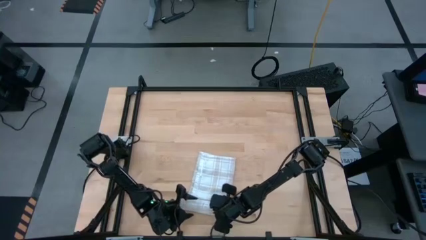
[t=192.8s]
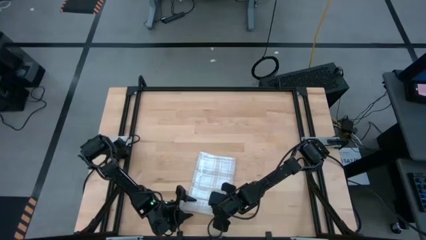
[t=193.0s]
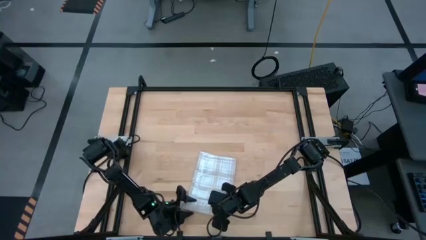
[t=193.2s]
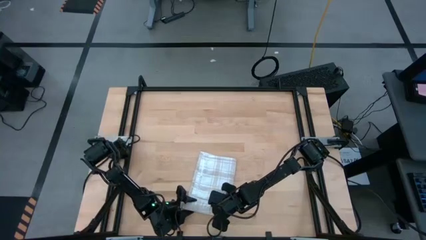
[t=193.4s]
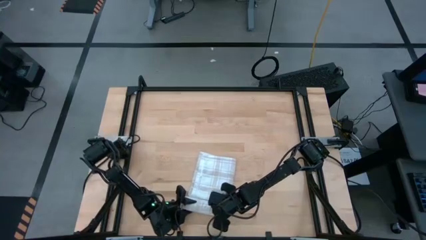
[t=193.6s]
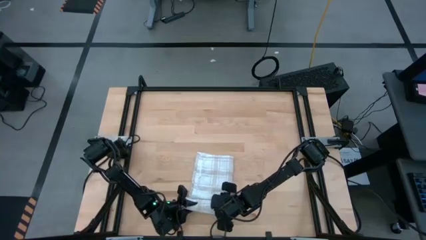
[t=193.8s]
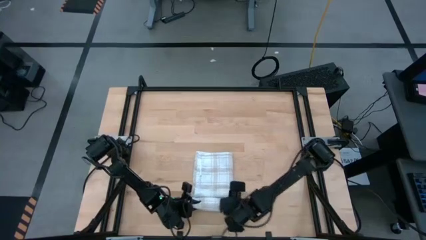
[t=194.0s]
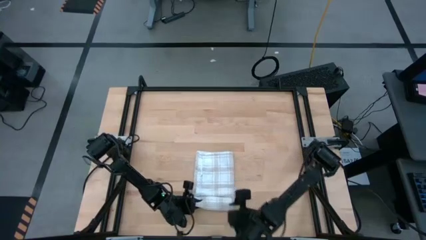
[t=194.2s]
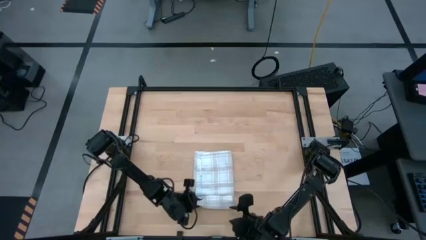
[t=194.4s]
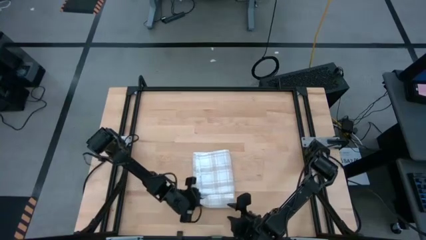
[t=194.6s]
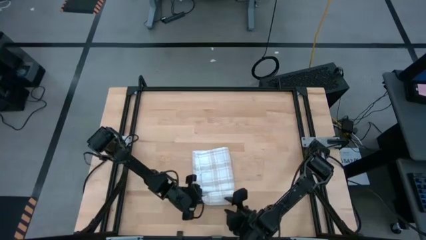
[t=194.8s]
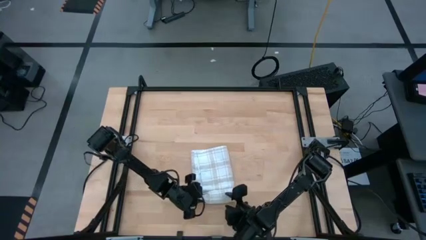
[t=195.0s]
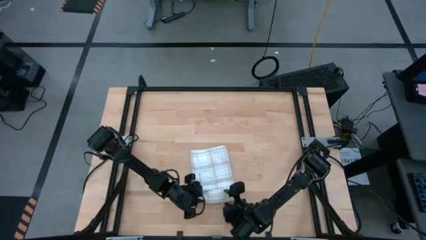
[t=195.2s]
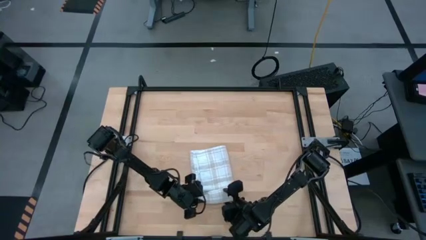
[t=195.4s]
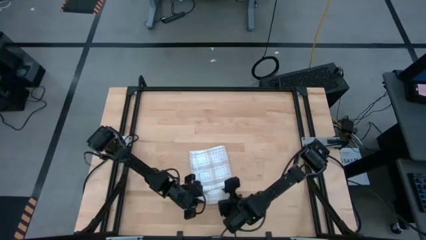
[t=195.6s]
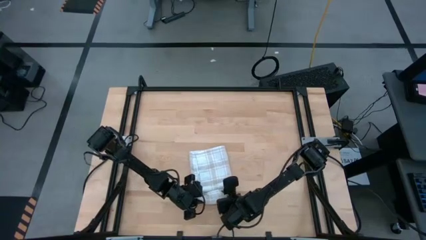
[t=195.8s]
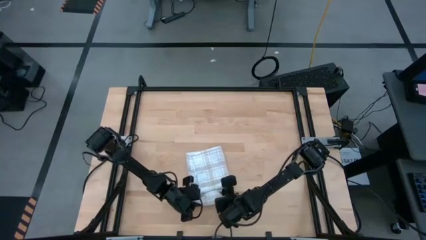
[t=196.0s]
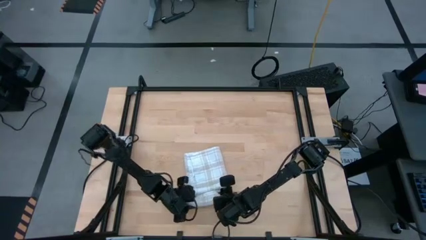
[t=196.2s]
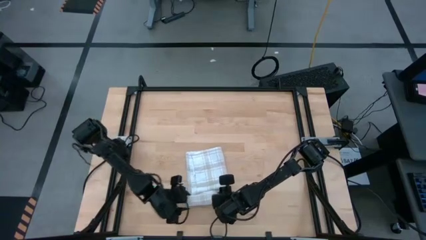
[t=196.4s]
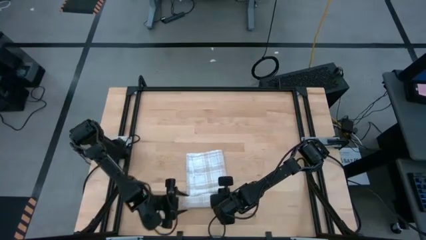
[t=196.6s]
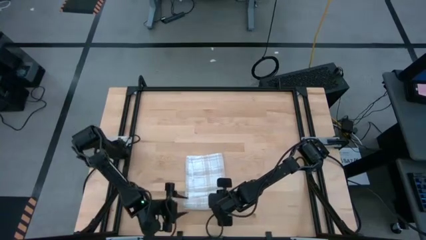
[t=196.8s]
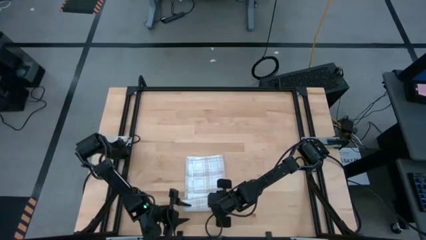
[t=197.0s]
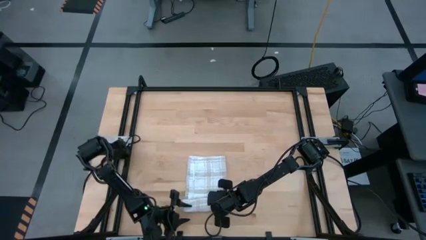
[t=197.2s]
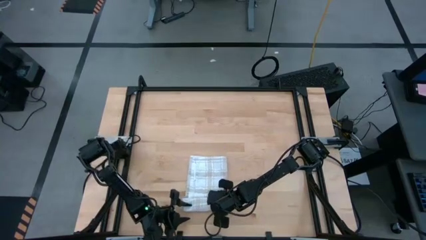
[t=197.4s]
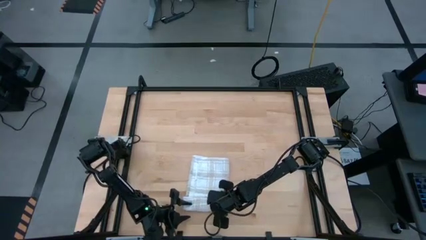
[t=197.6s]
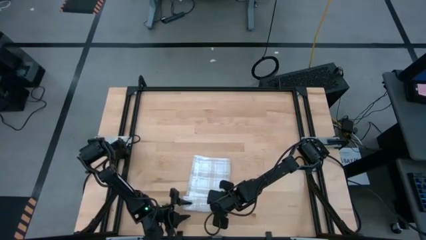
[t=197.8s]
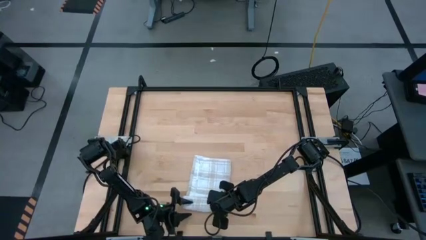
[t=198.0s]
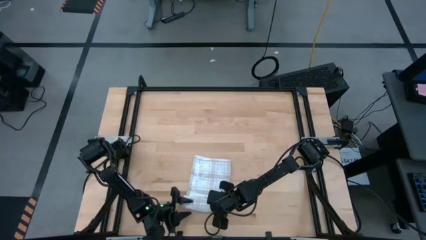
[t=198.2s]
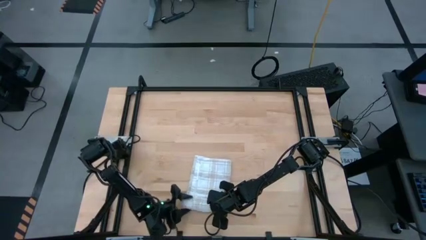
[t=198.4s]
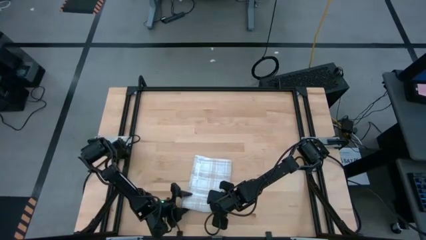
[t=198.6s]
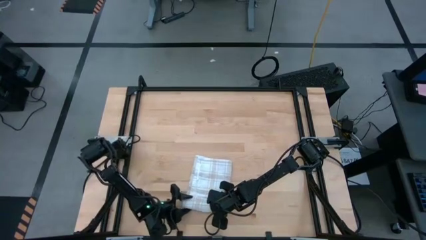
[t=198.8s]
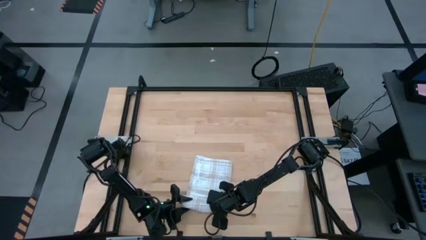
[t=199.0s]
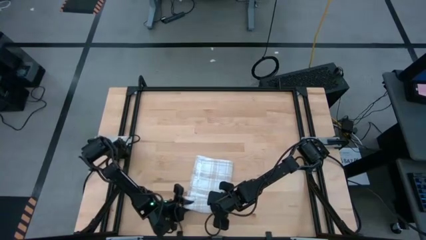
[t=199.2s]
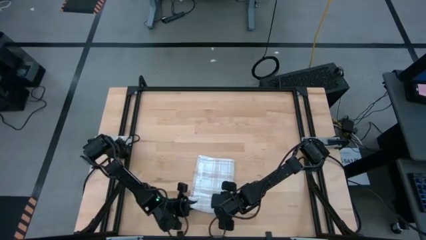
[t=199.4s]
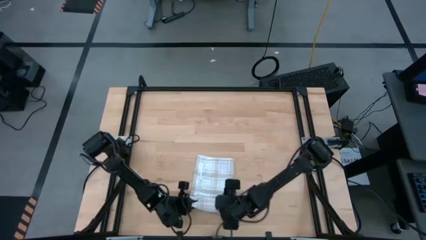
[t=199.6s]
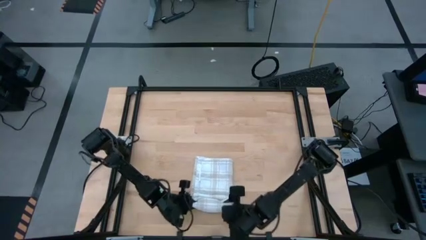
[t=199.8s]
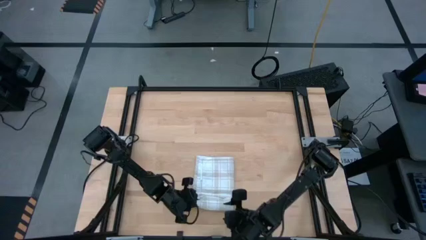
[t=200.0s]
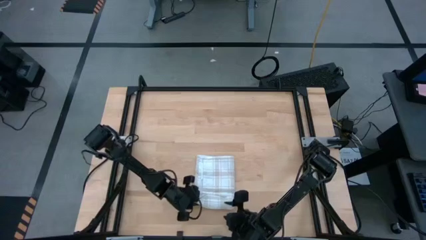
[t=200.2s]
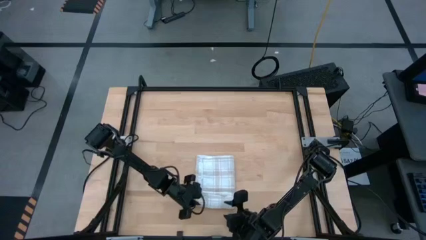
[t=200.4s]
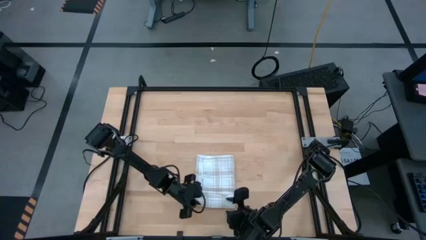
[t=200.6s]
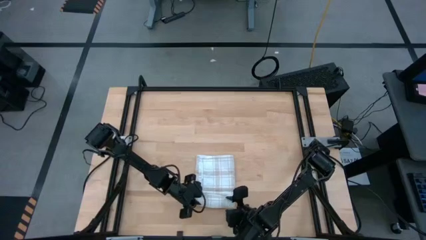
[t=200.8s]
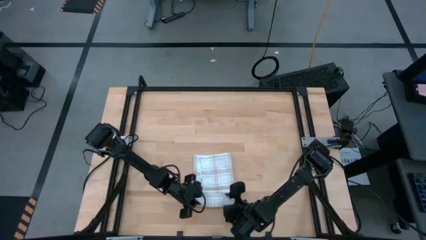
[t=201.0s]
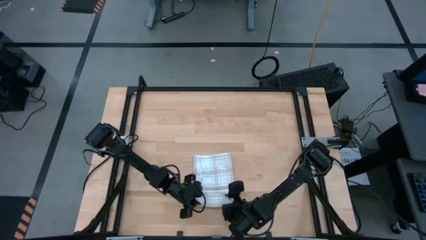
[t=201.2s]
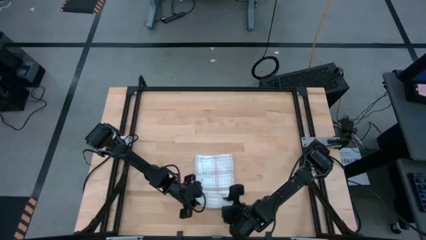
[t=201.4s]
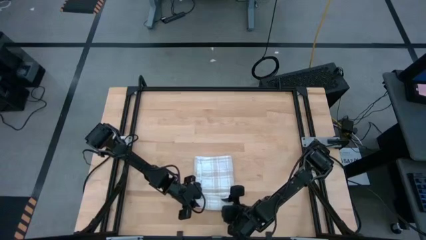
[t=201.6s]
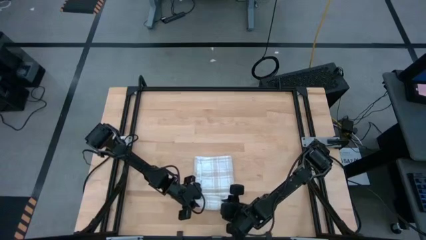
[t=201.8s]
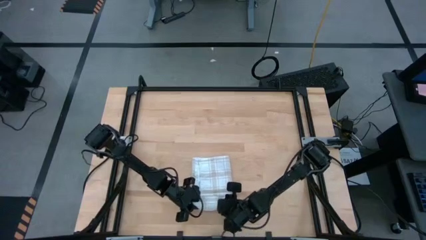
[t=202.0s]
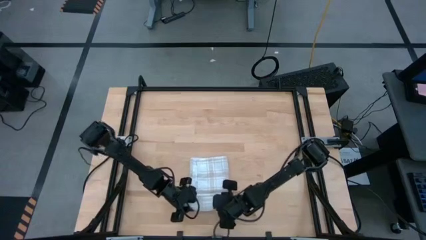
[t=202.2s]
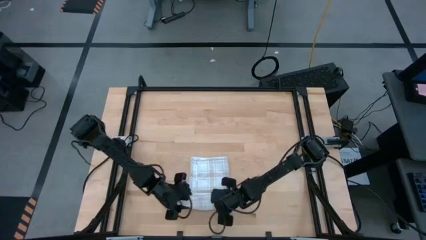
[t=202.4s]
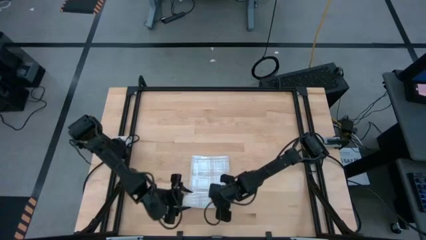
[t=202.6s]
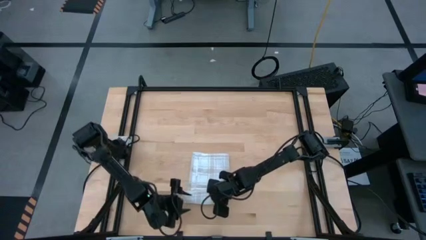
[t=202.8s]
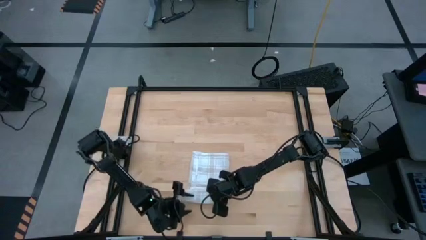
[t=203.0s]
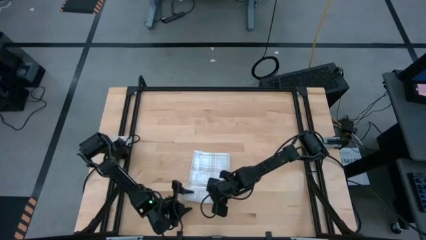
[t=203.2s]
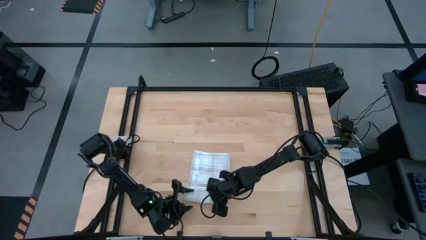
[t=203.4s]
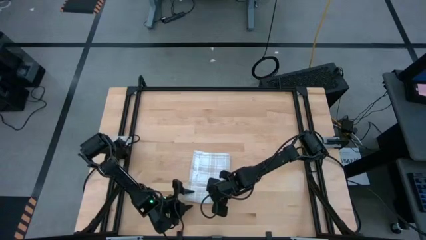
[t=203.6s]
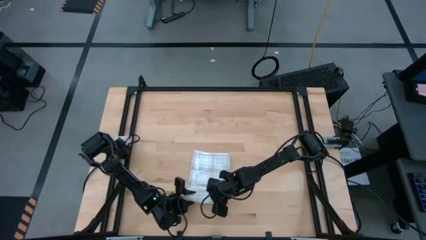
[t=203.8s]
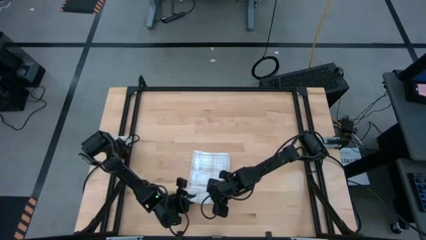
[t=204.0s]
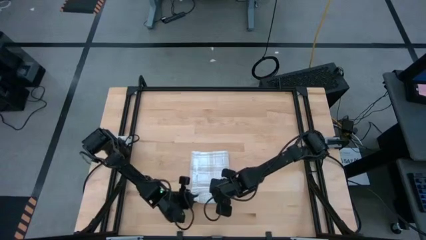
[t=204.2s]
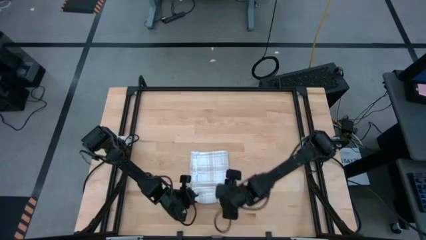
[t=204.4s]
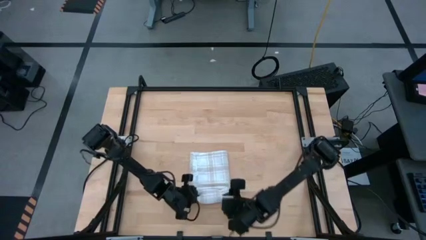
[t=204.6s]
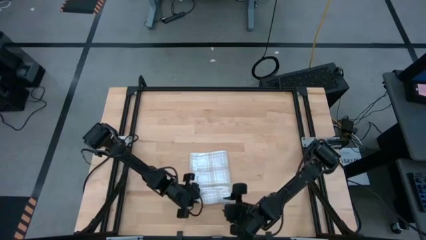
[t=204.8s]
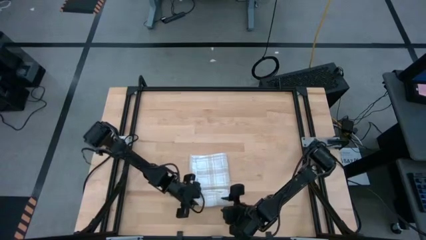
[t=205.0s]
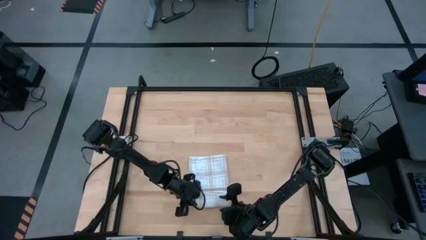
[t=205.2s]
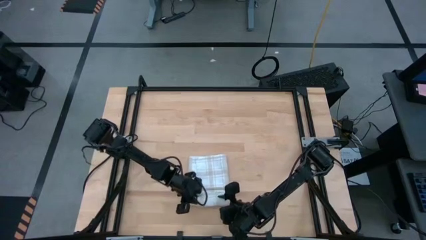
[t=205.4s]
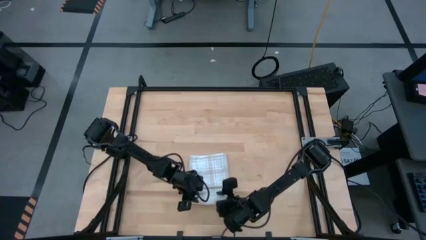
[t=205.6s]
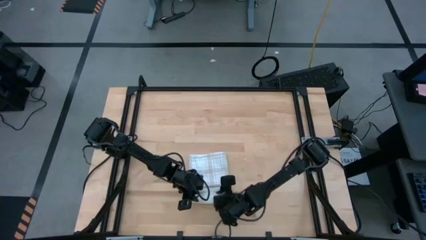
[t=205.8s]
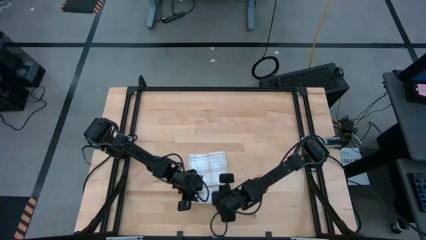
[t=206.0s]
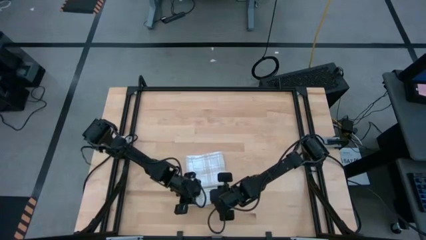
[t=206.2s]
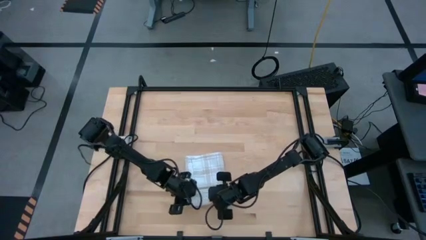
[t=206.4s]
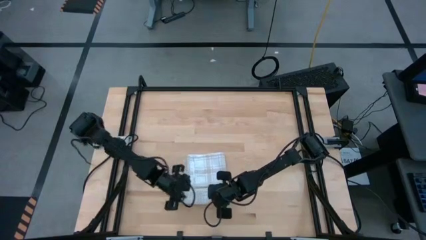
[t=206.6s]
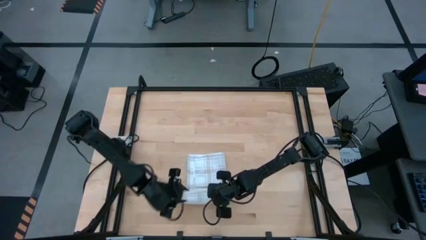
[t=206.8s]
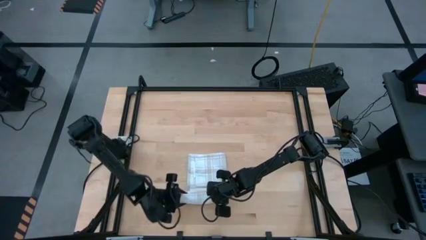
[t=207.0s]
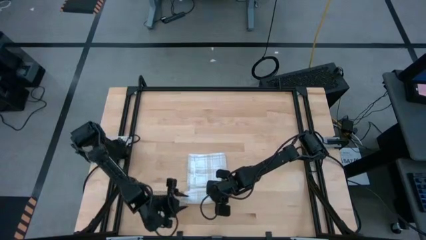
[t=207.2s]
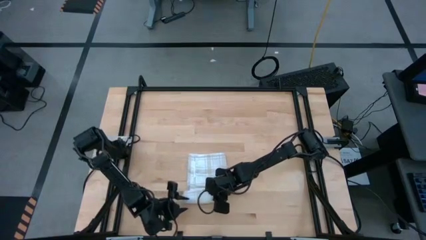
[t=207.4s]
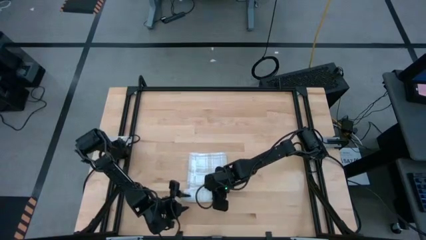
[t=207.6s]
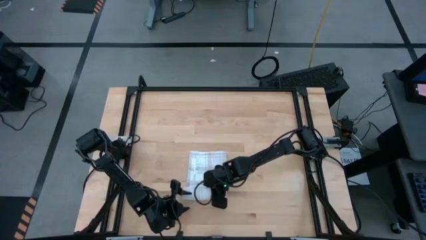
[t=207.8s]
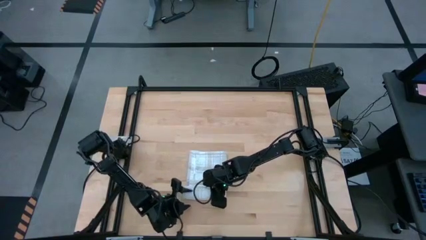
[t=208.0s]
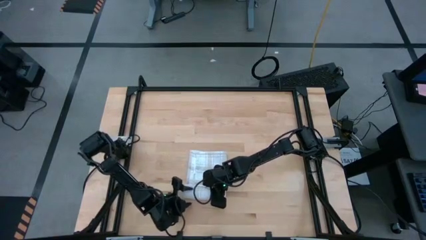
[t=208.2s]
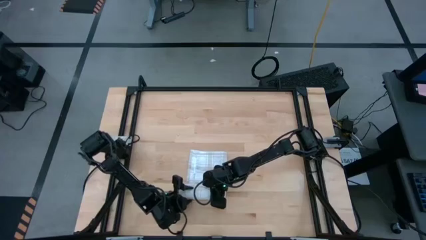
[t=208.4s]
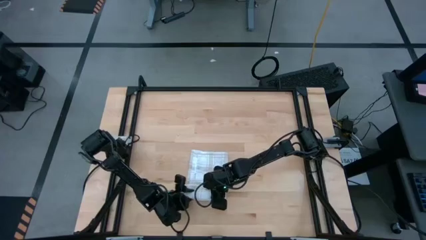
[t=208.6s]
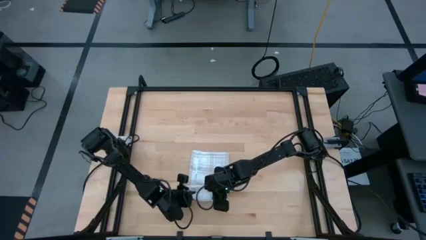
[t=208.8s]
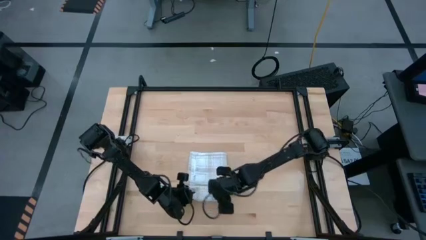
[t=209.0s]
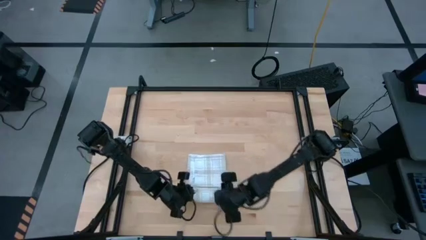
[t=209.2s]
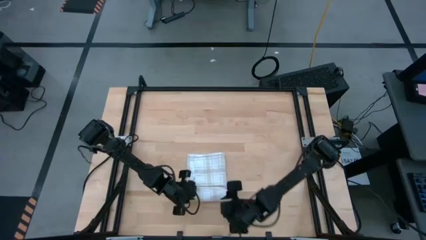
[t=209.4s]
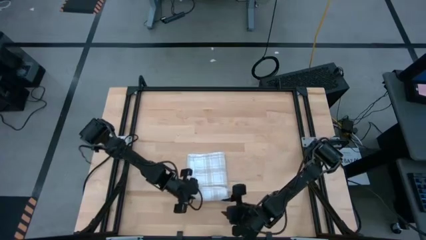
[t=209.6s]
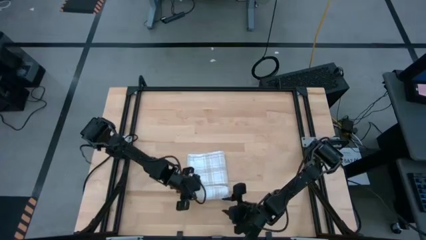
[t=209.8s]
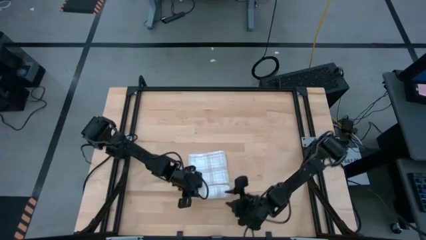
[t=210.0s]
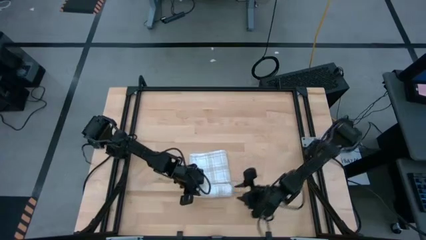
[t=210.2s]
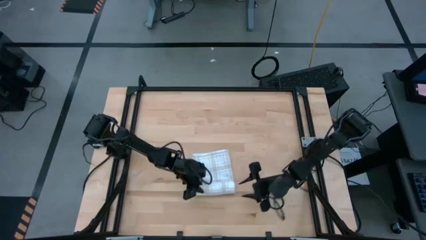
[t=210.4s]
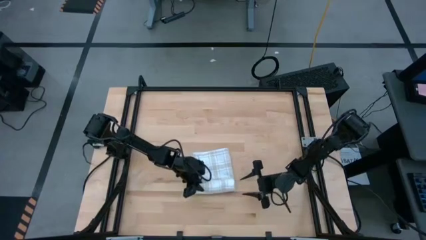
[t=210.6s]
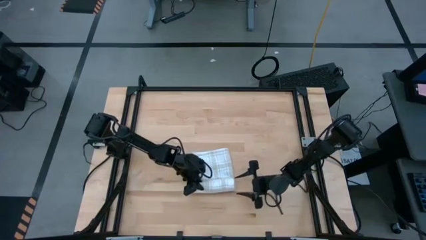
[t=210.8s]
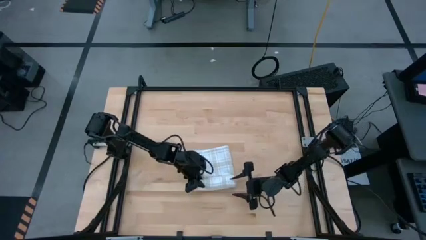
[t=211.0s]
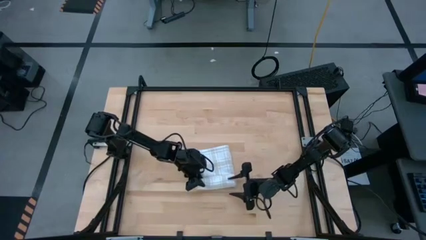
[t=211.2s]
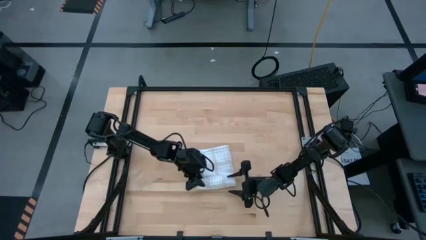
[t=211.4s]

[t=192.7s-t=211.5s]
Task: Roll towel
Roll the white kitchen towel
